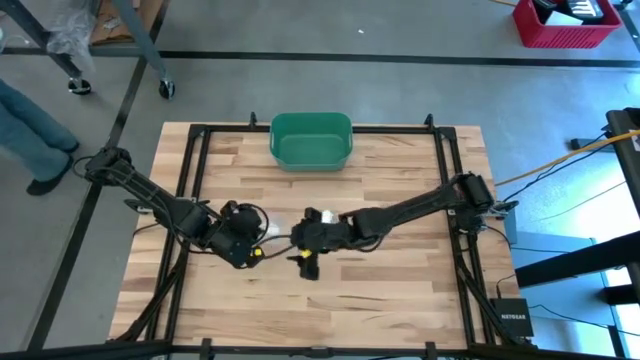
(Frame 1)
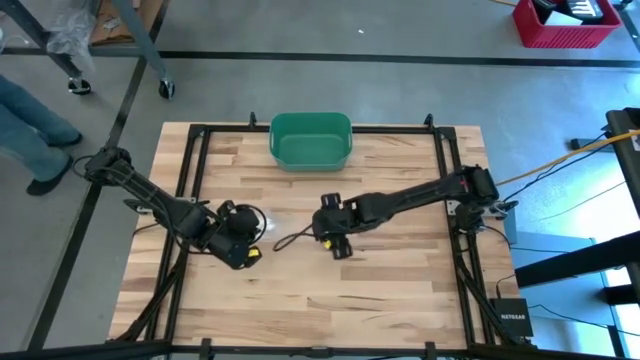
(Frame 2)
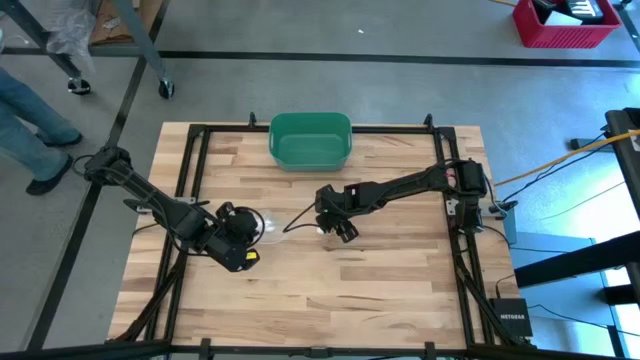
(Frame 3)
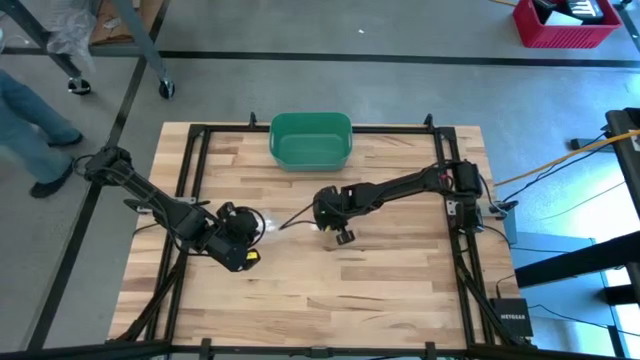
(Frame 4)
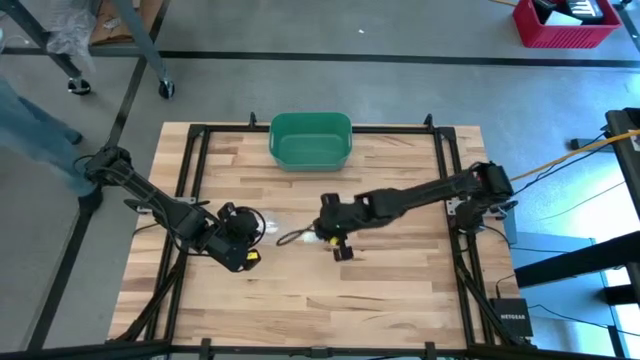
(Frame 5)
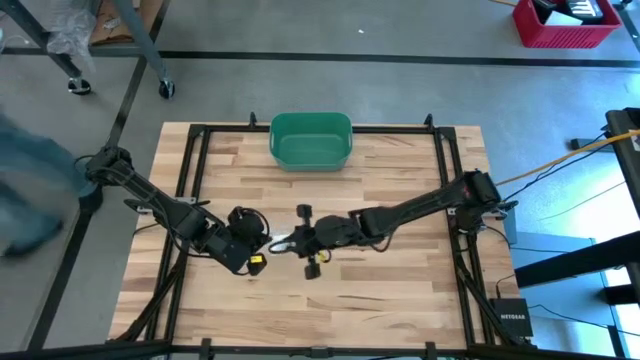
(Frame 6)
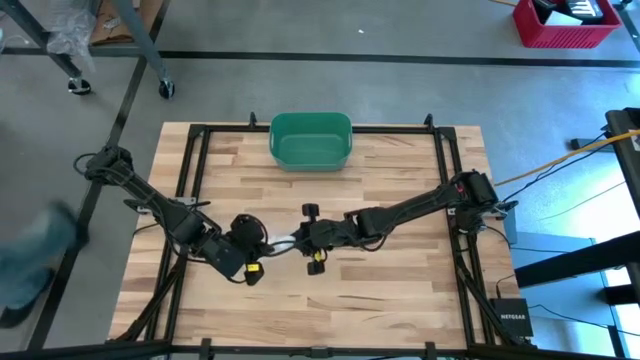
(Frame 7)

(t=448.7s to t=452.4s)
Task: Roll bandage
Put the white bandage into the transparent zip bag

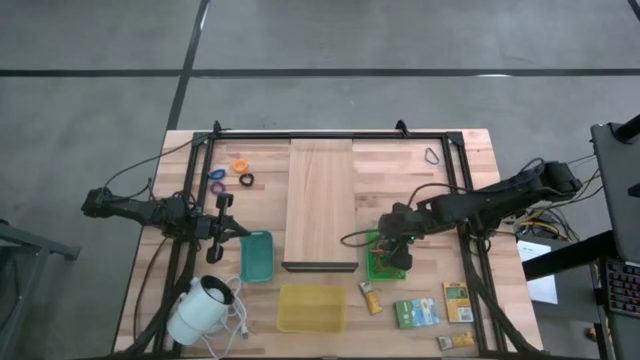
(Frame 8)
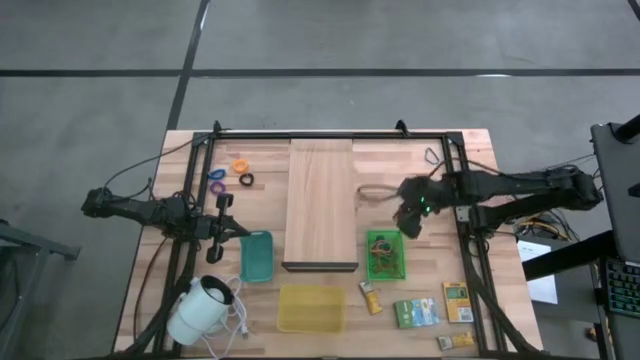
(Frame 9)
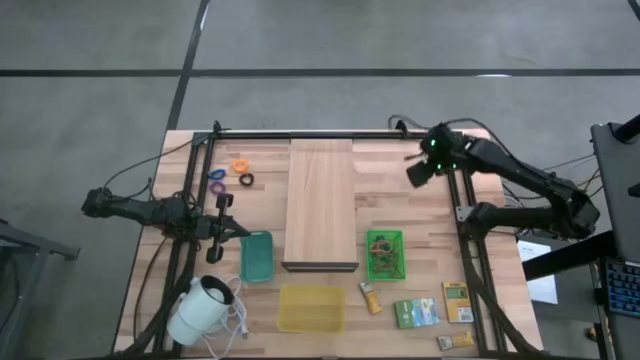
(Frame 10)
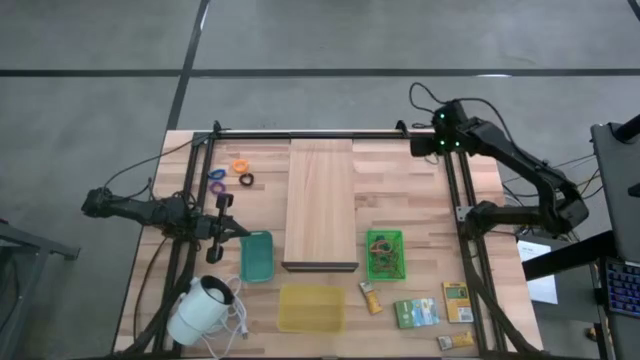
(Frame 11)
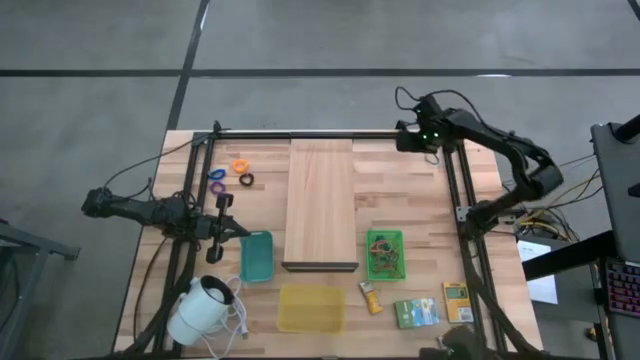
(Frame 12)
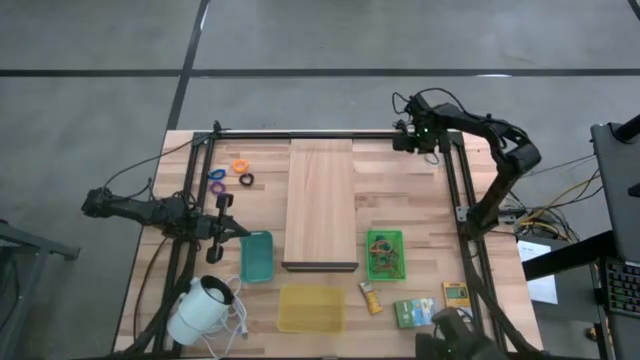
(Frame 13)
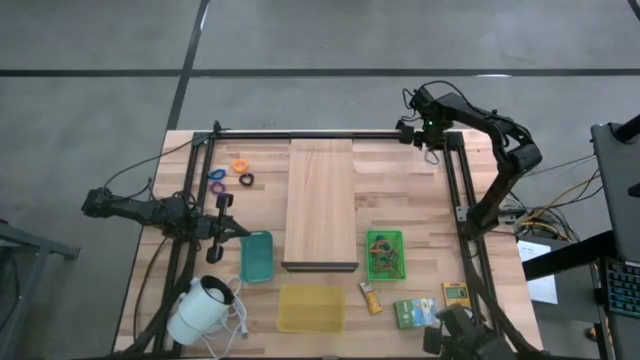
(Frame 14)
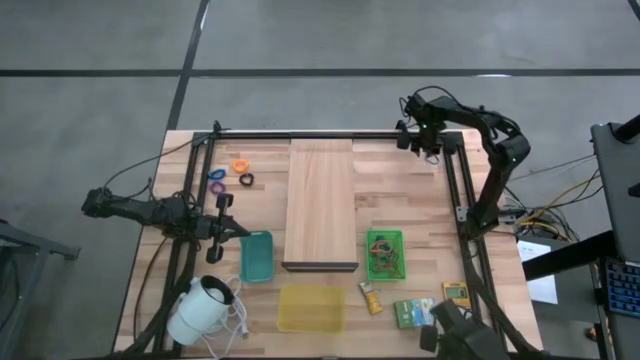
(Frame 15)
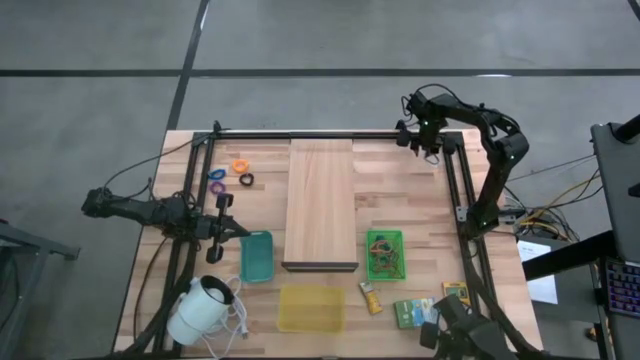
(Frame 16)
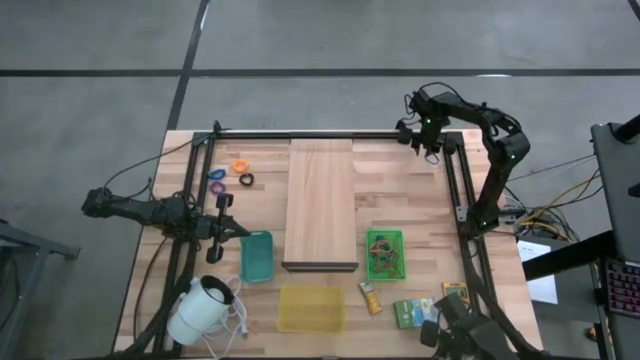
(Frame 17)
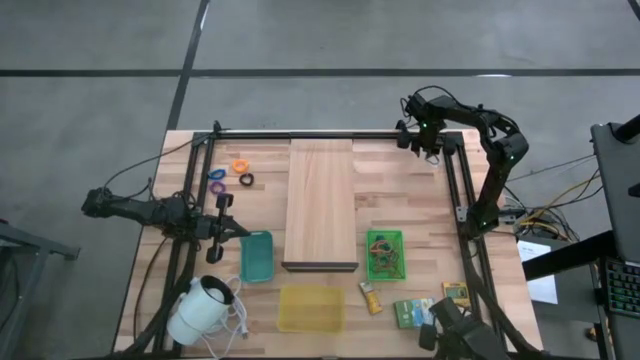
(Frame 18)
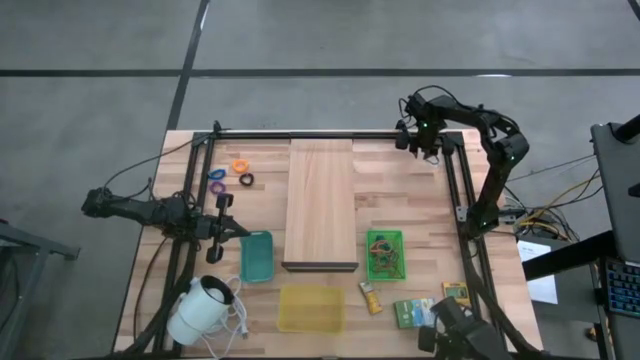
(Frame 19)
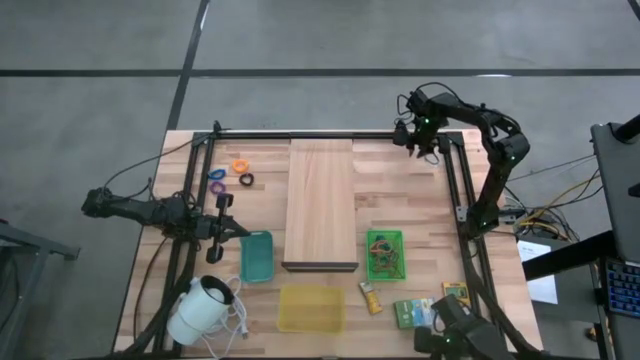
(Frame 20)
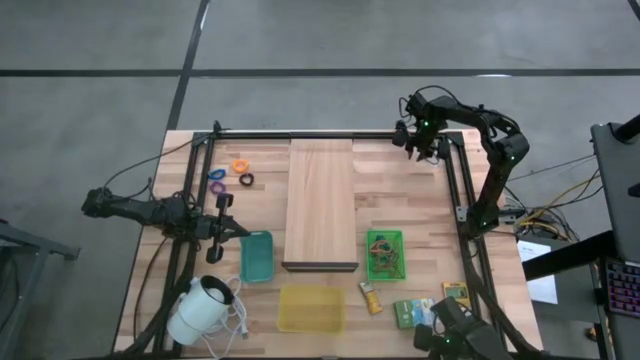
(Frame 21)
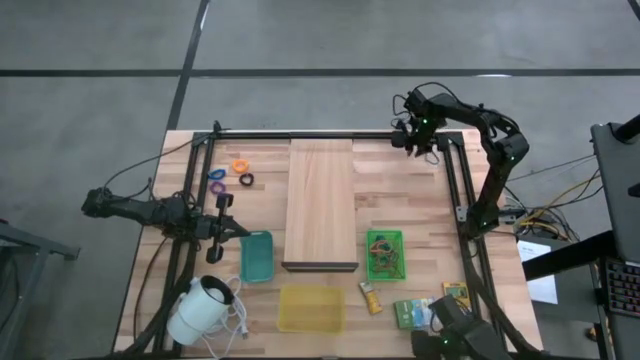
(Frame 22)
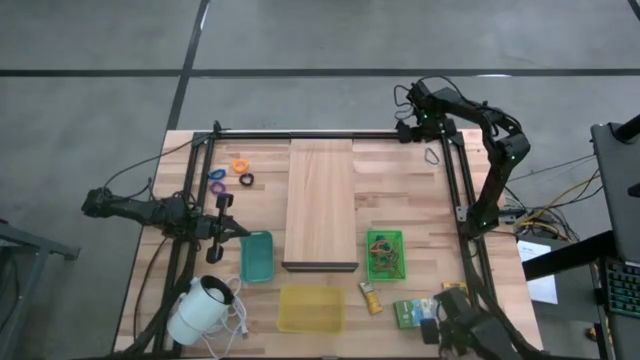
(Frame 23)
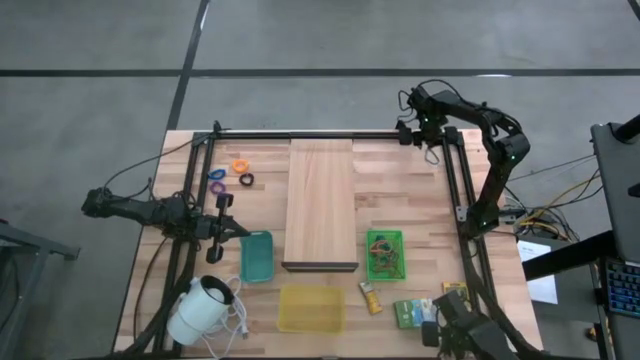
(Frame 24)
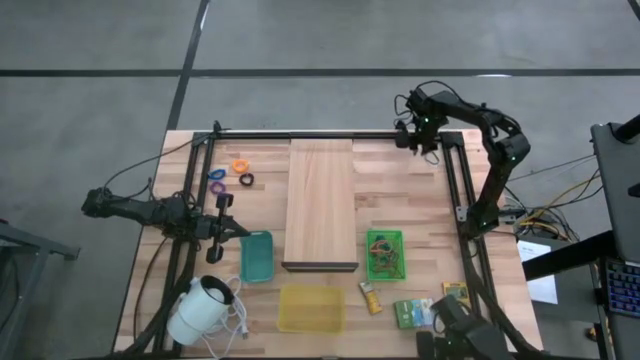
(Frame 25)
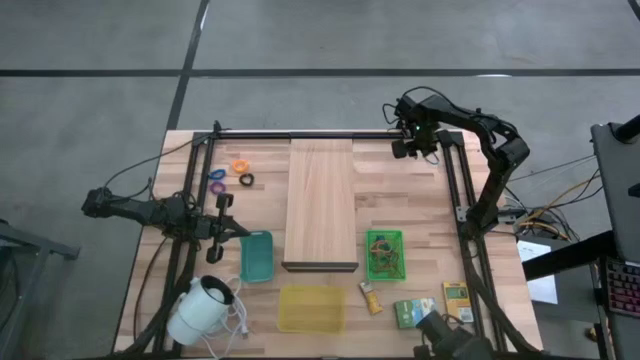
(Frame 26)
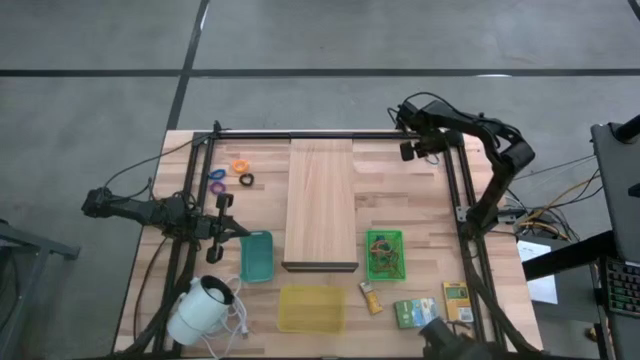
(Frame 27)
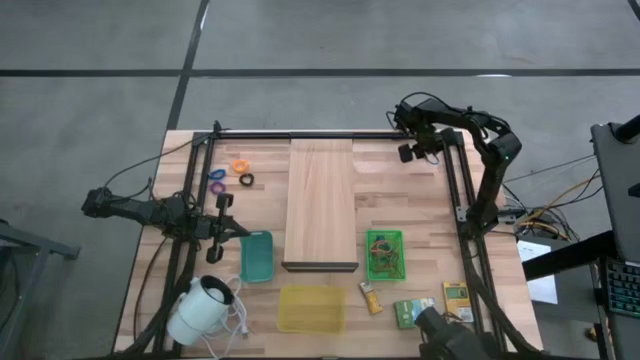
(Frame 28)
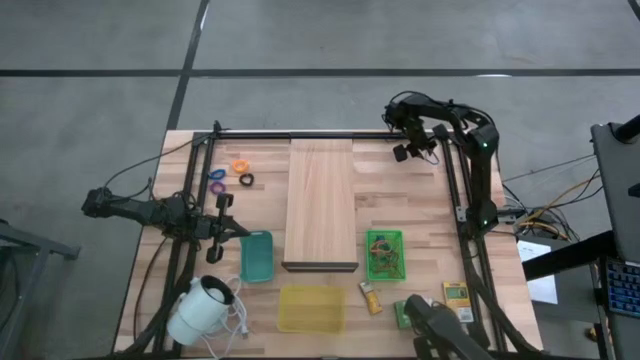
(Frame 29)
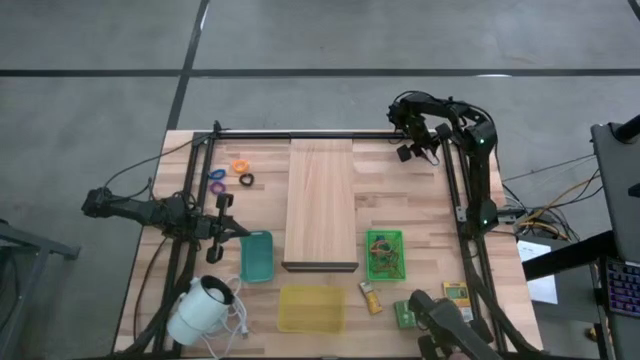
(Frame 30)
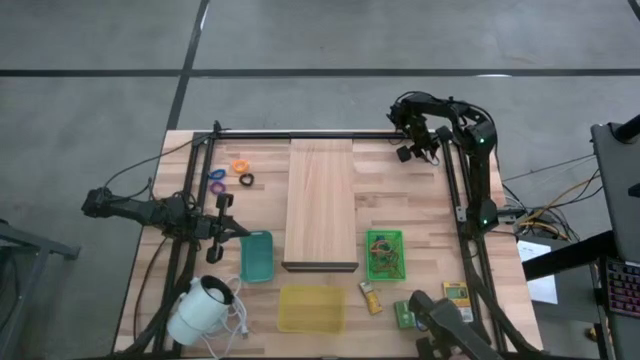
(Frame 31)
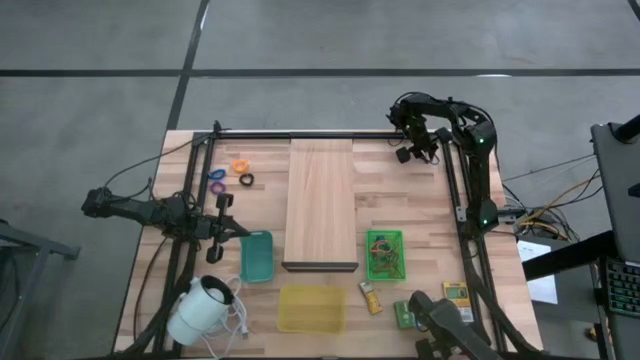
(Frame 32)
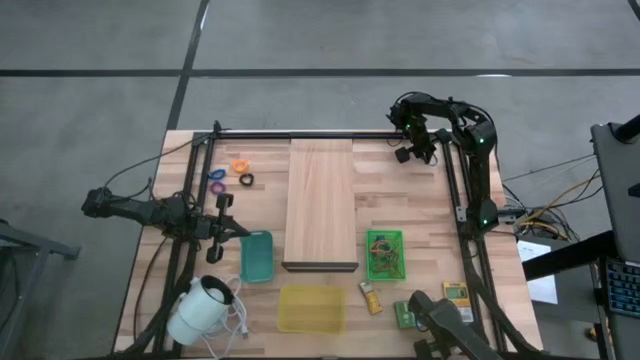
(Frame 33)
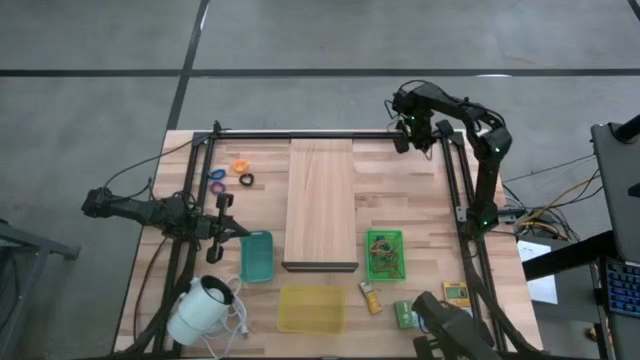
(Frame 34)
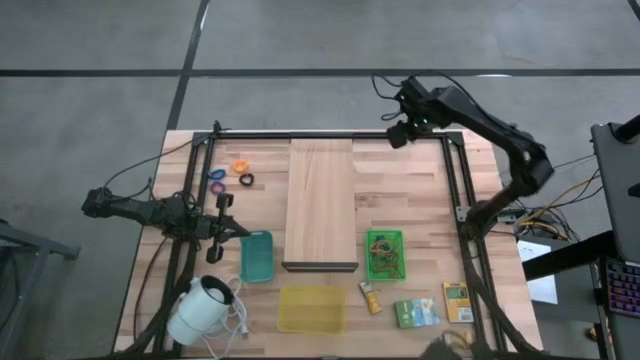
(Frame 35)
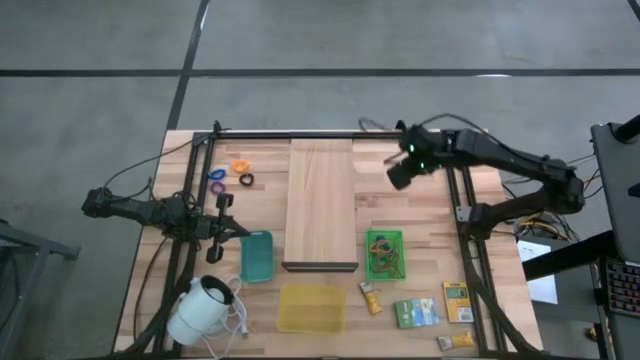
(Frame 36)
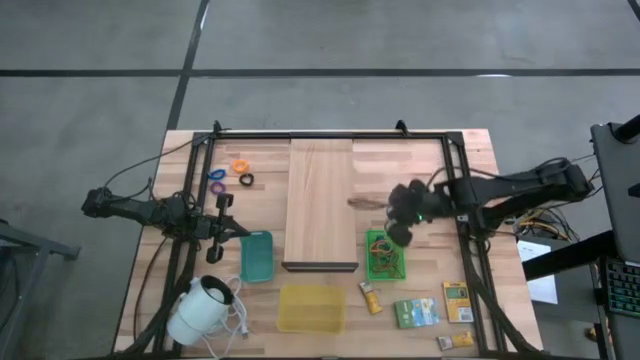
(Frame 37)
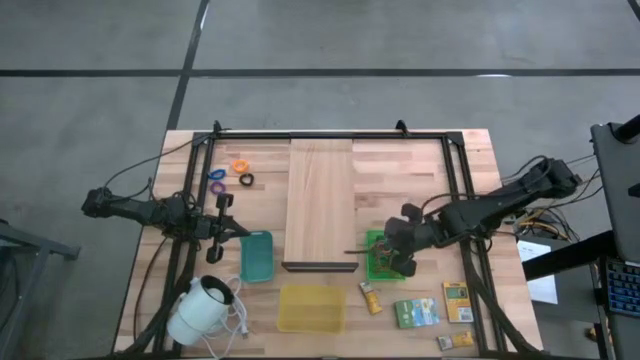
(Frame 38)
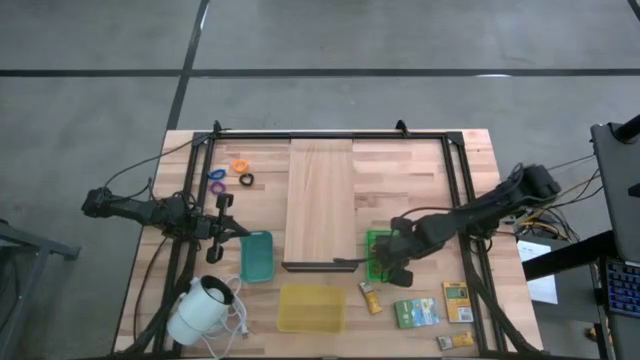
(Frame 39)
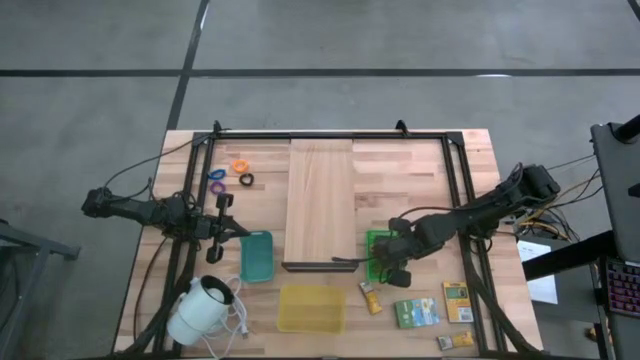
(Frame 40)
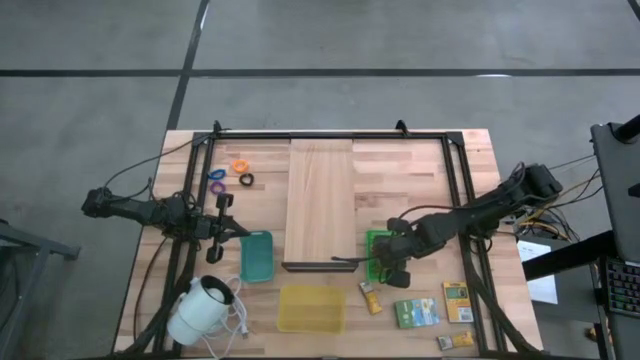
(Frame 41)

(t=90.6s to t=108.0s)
Task: Pick & Place Office Desk Supplies
Put the thin blue rubber band into the green bin
